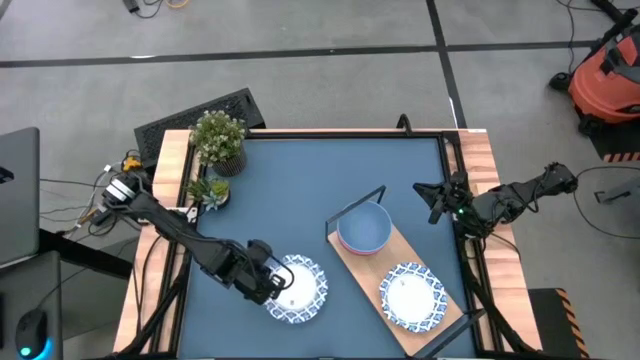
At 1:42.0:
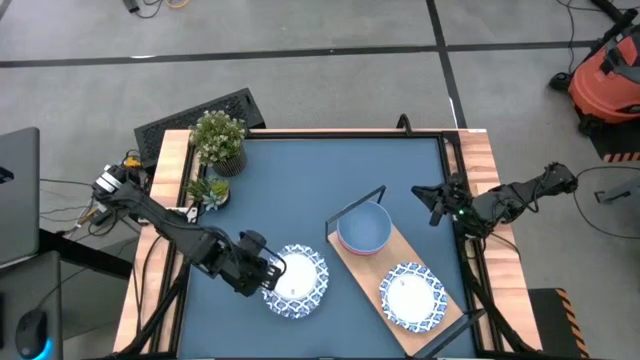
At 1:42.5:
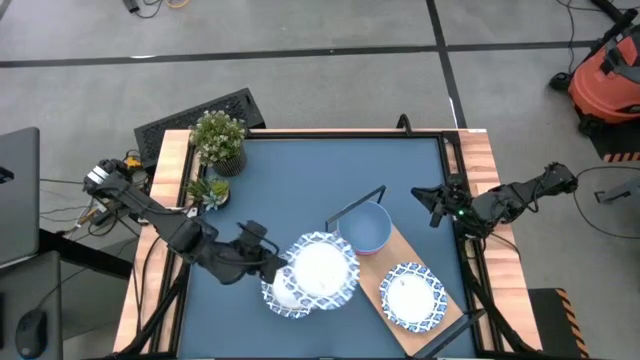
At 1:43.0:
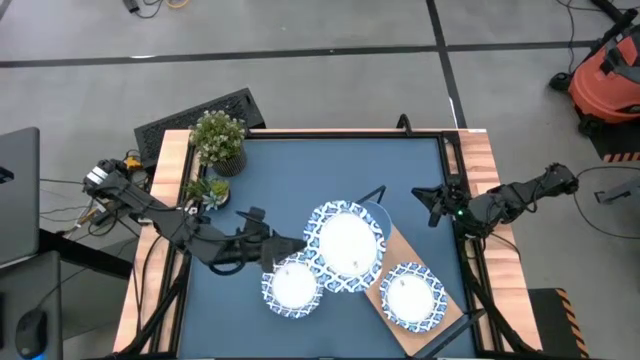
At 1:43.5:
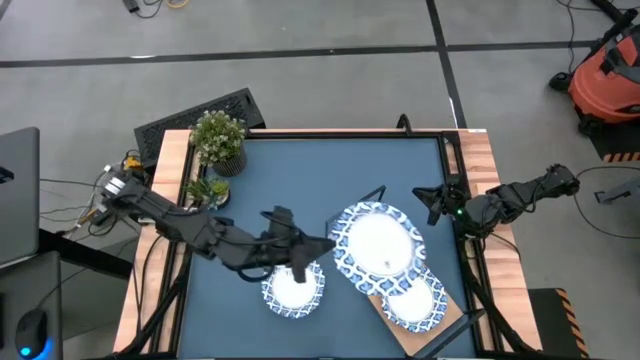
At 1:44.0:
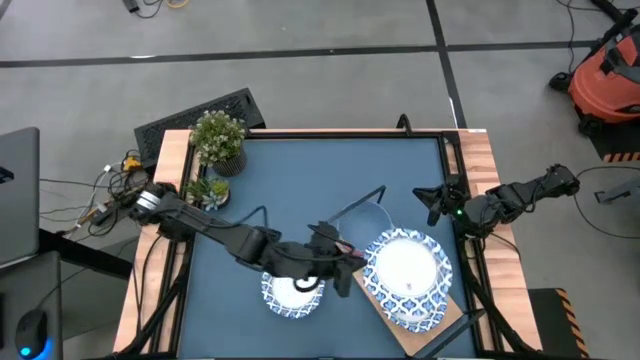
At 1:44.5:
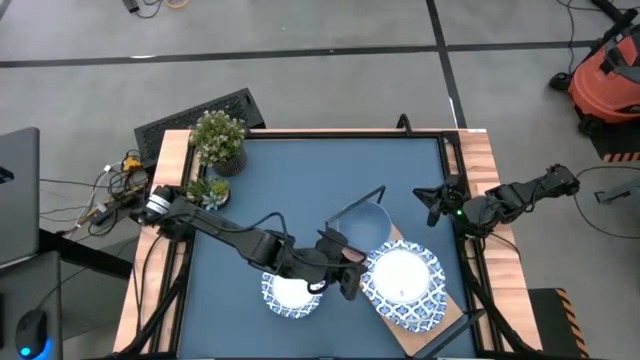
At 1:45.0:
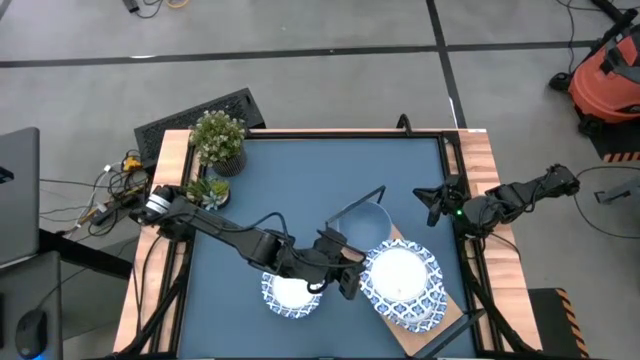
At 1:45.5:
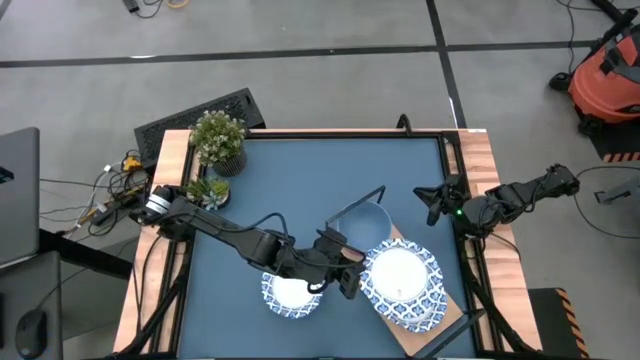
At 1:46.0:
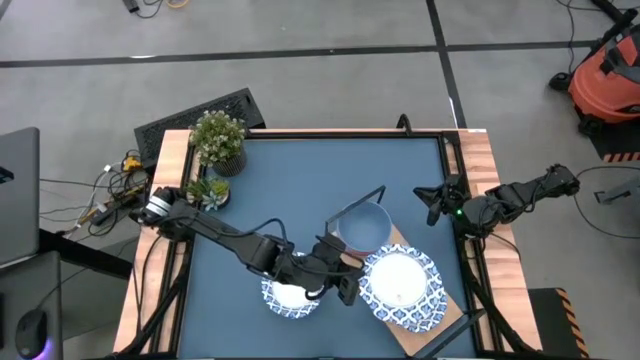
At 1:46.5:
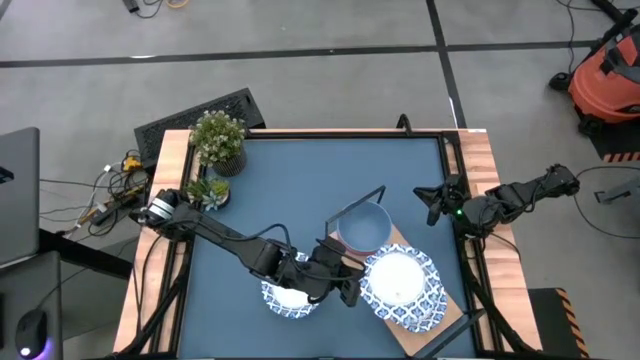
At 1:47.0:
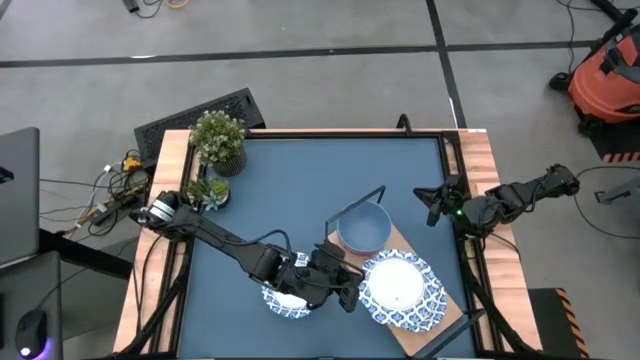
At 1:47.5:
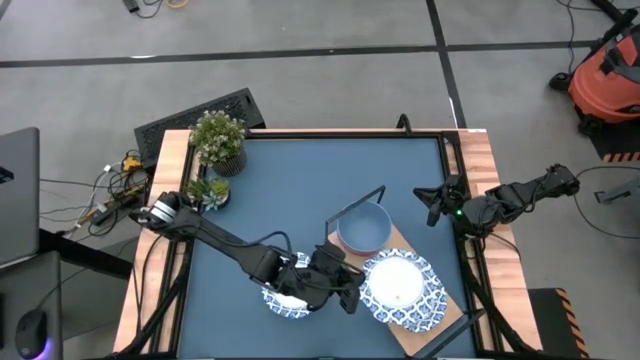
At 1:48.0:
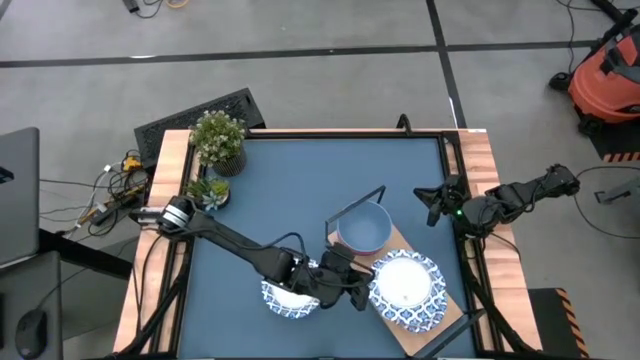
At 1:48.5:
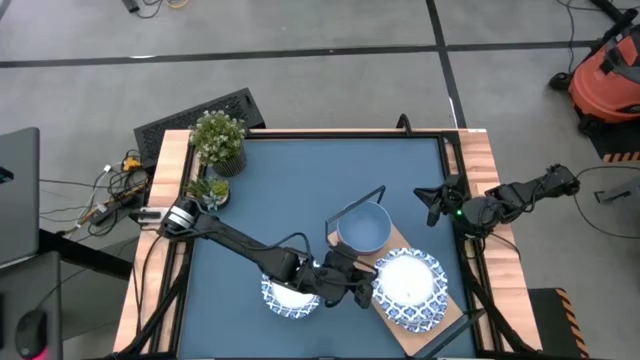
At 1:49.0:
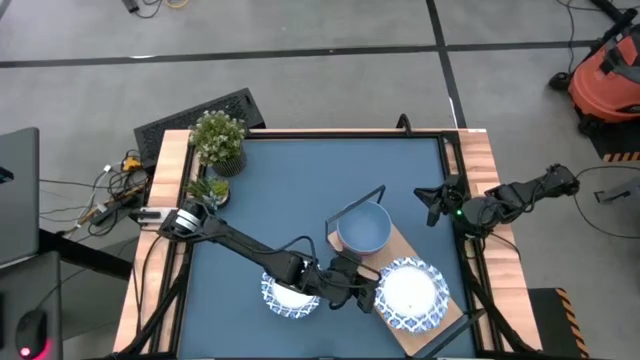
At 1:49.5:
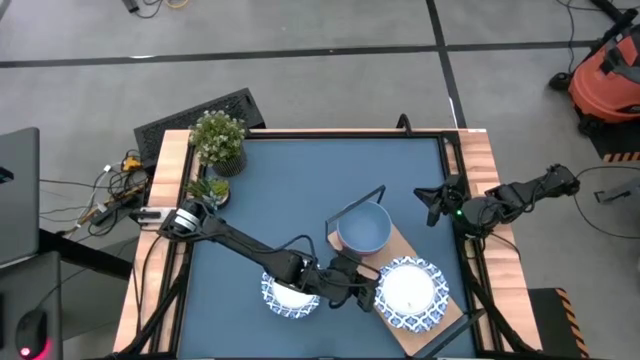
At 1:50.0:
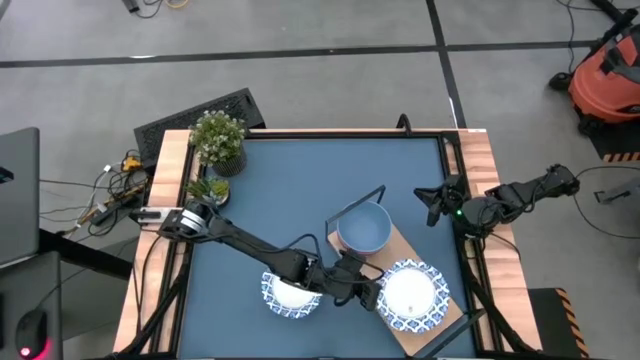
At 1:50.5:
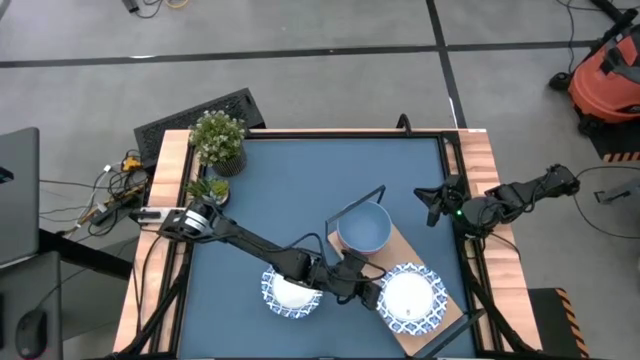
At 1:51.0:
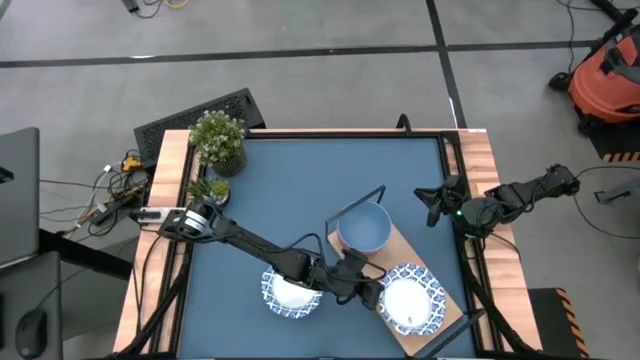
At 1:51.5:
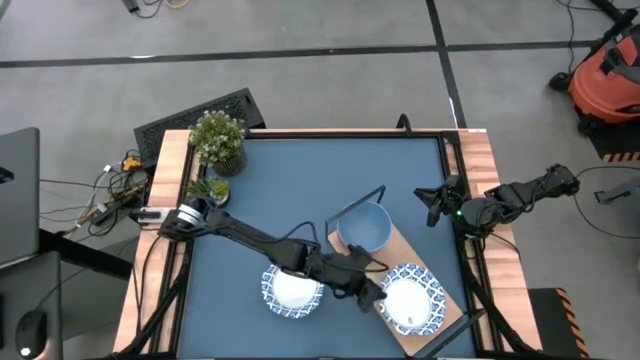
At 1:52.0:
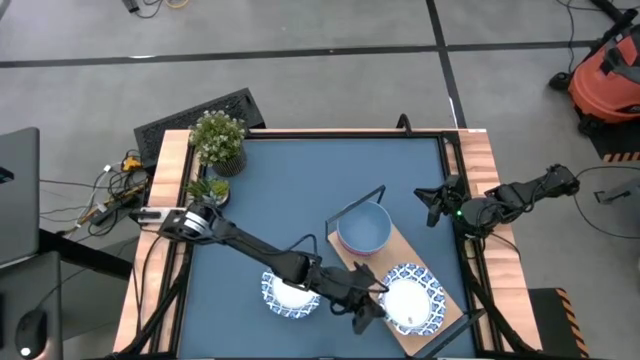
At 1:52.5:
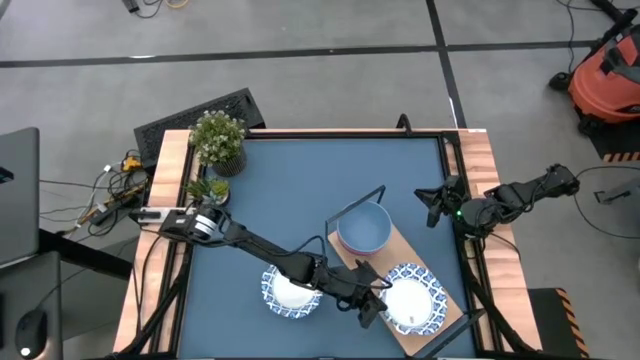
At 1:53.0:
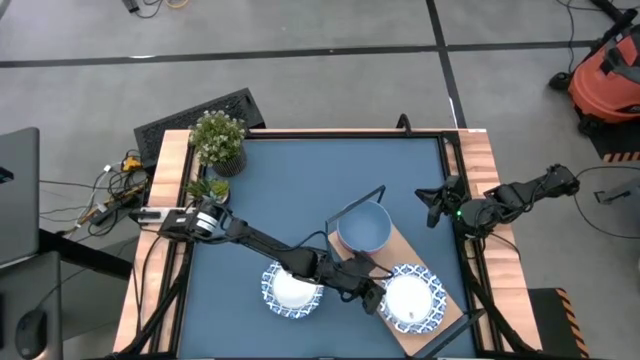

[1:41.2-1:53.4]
Task: Place and stack bowls onto a shelf
Stack the white bowl on top of the white bowl on the shelf

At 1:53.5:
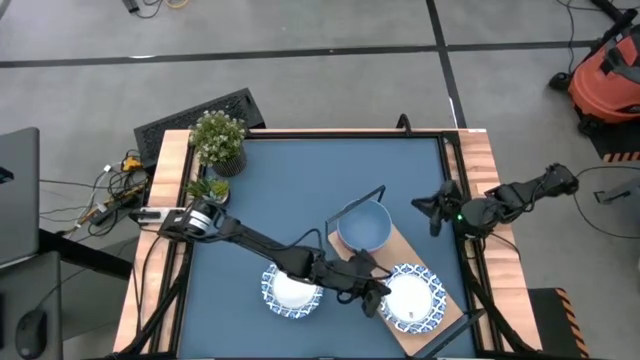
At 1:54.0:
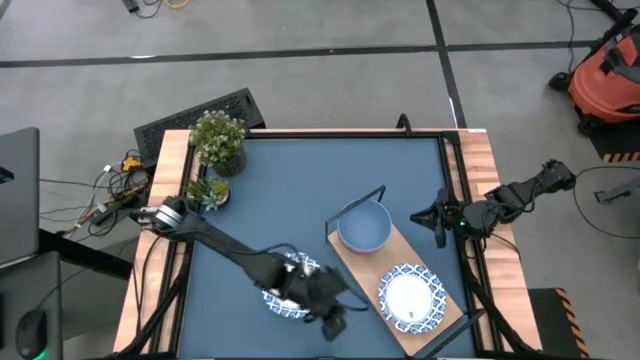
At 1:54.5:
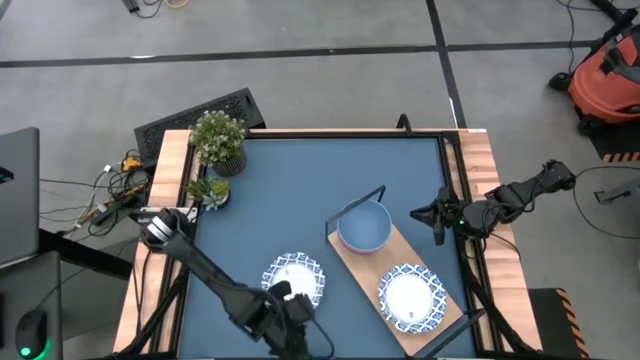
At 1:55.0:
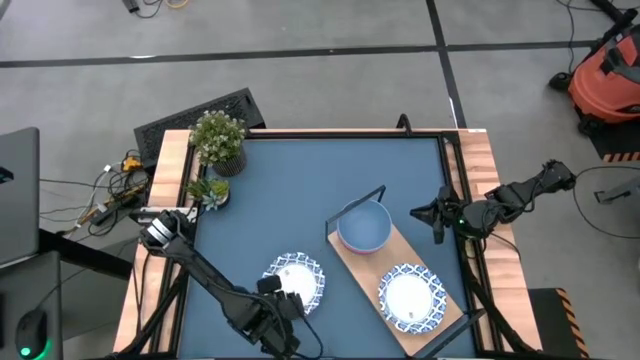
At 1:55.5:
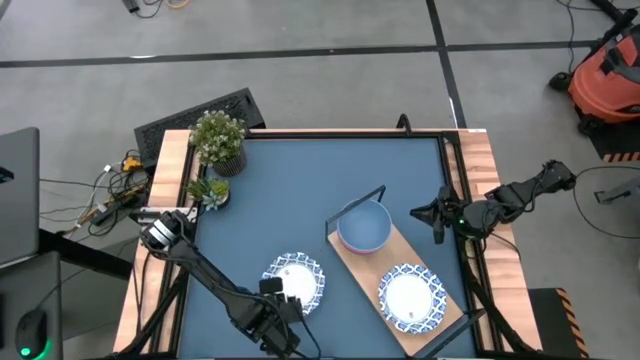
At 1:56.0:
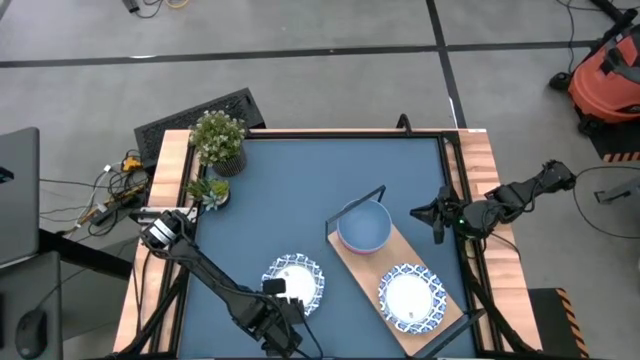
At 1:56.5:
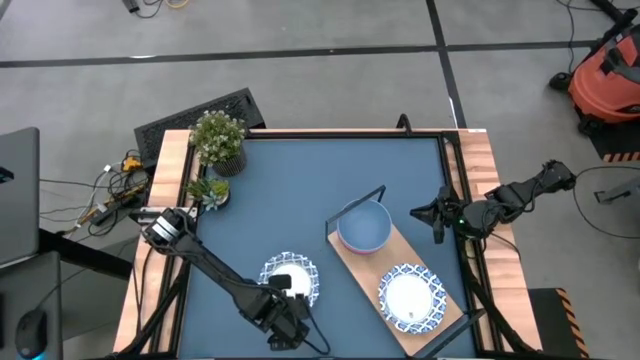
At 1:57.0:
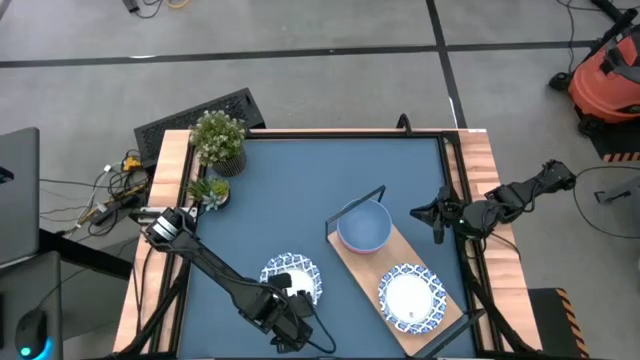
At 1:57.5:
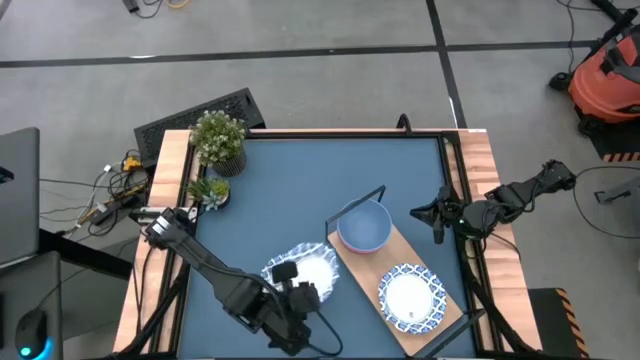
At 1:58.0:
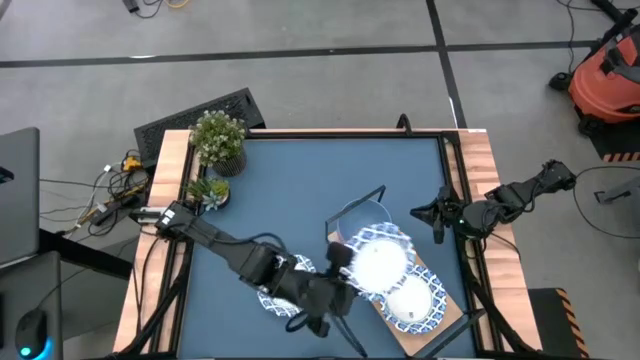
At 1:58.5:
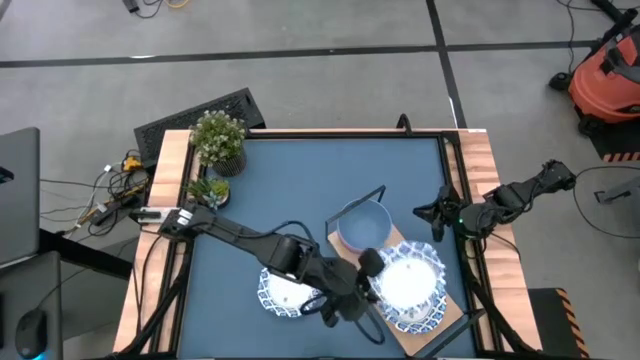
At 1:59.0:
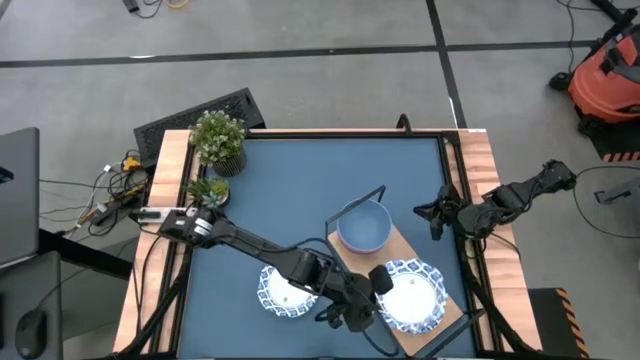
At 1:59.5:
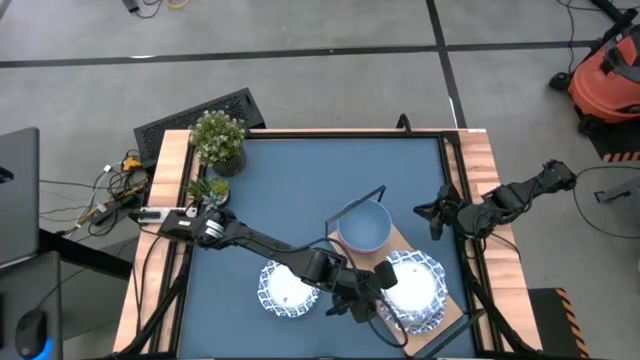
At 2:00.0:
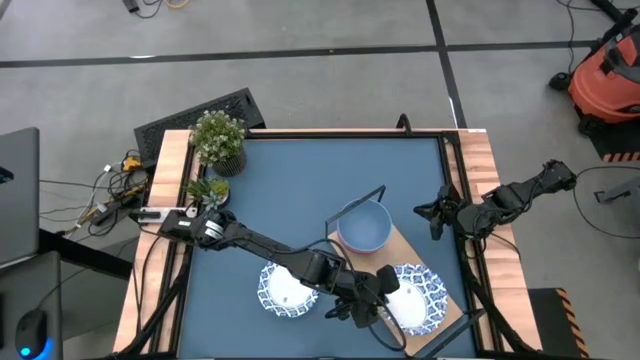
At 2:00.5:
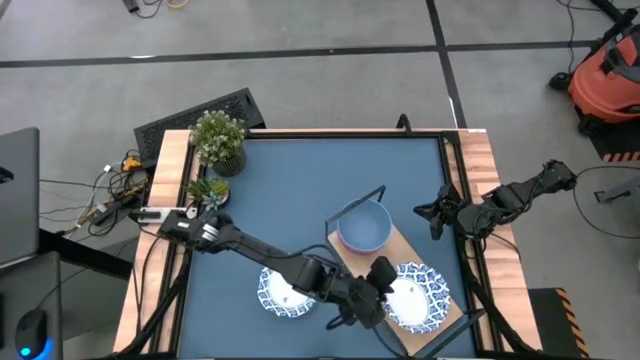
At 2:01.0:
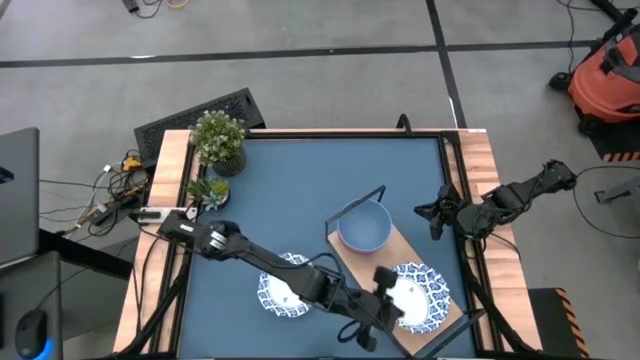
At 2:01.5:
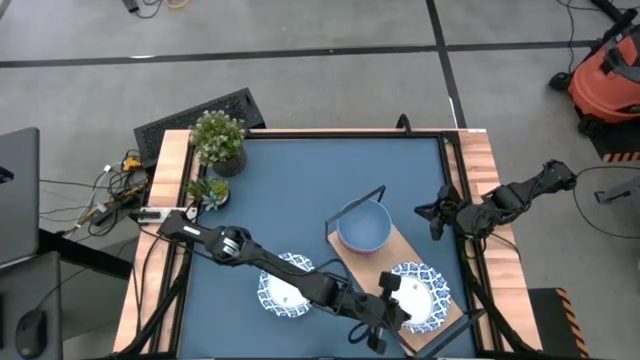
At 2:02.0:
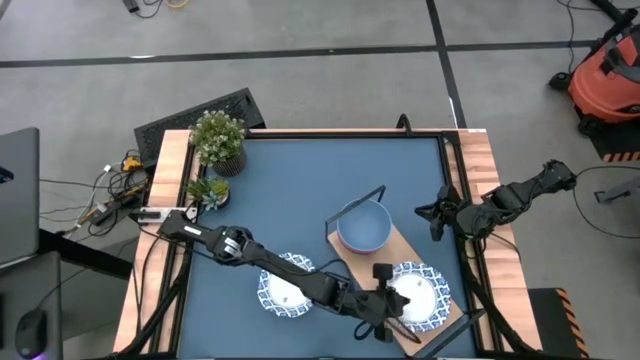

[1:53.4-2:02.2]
Stack the white bowl on top of the white bowl on the shelf
